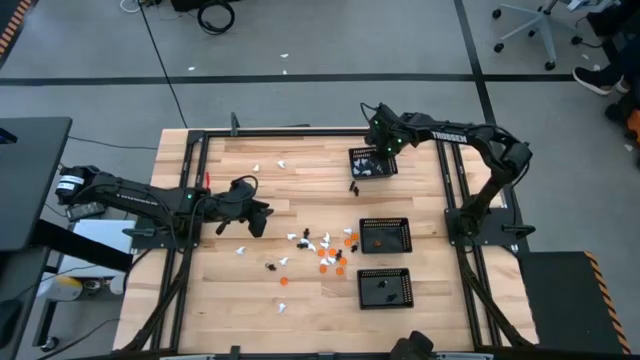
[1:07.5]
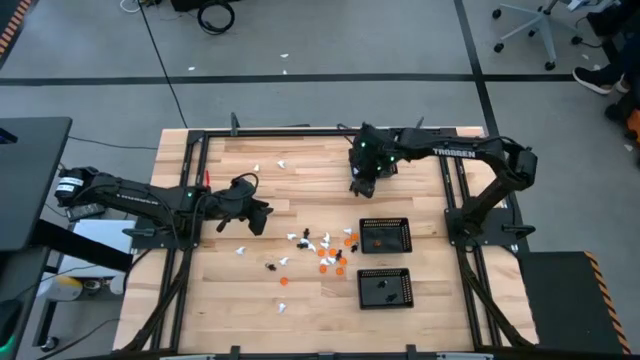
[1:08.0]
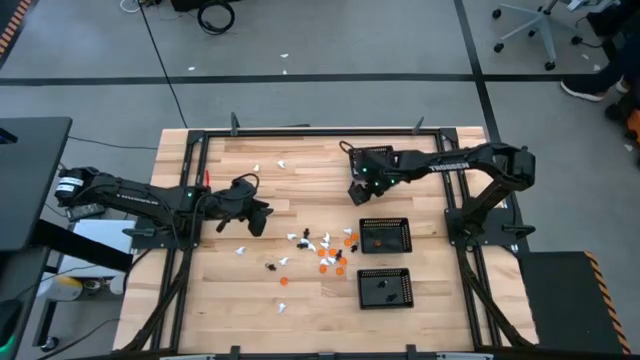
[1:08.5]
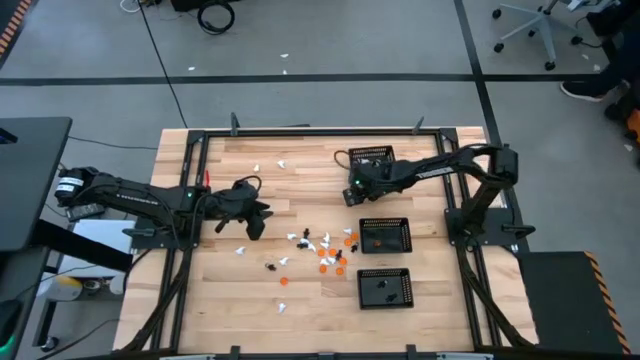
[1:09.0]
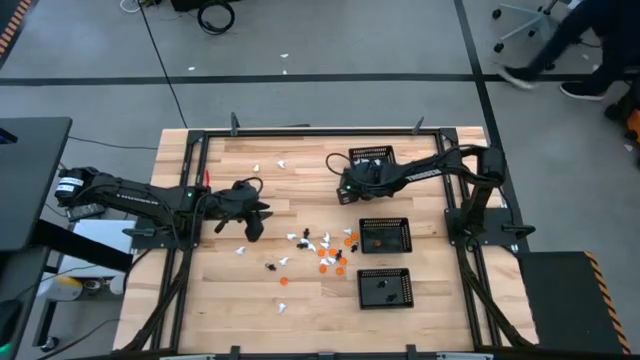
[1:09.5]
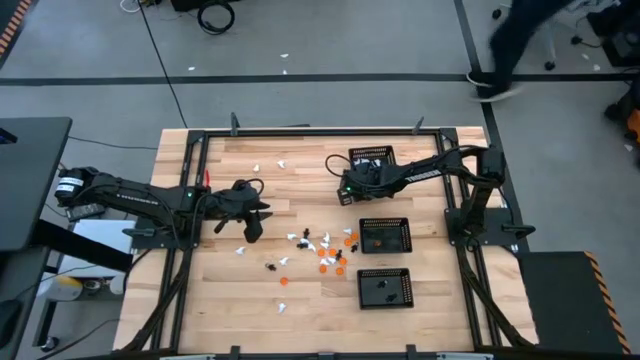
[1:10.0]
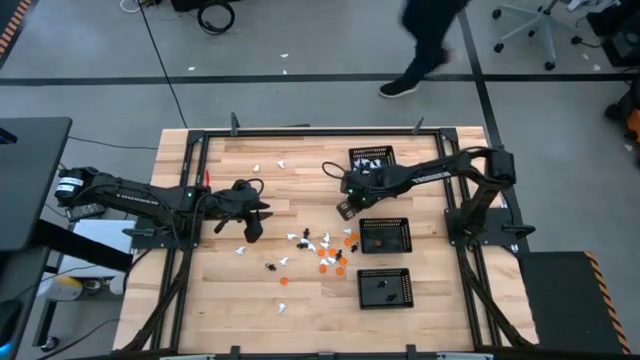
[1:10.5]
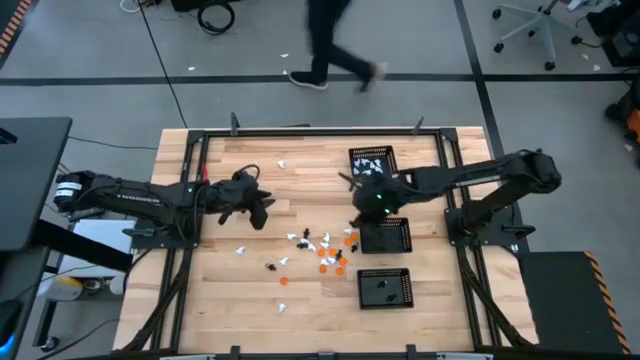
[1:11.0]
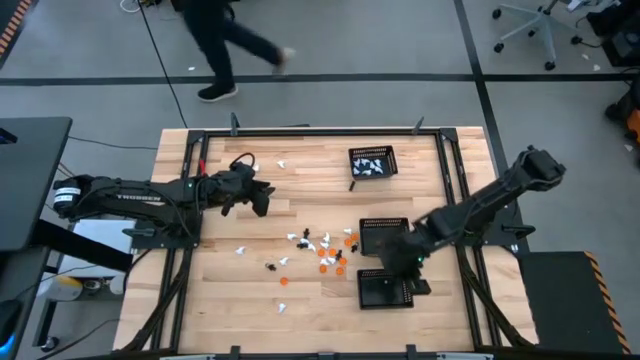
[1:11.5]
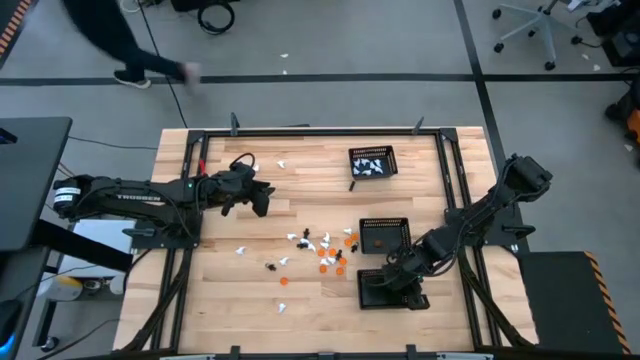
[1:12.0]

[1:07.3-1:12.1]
Task: Sort Halloween decoration
Put the black skeleton toy into the bottom black bin

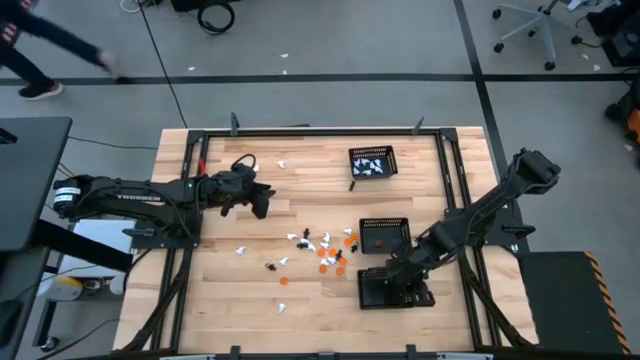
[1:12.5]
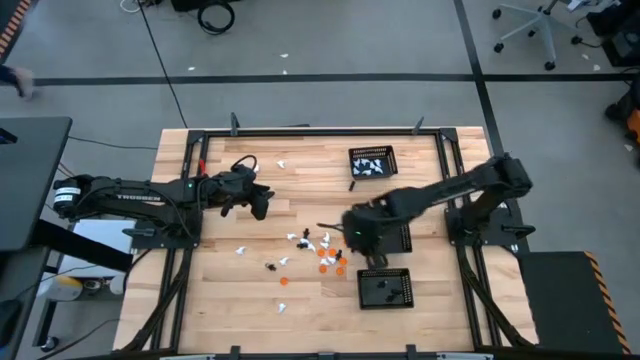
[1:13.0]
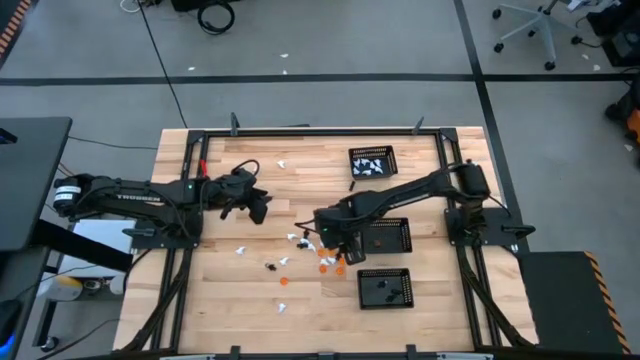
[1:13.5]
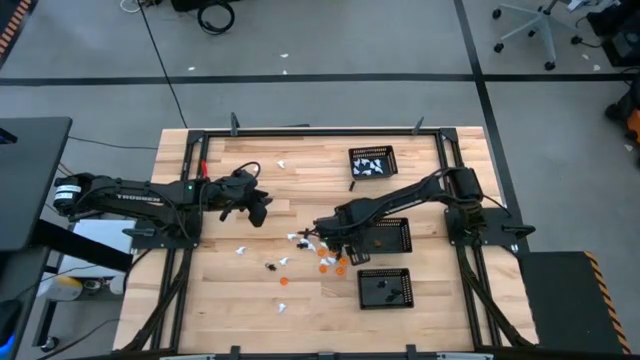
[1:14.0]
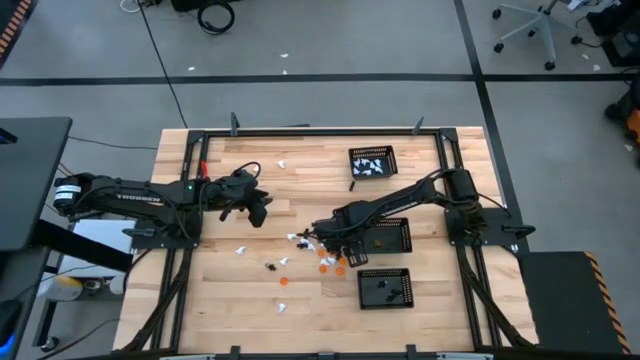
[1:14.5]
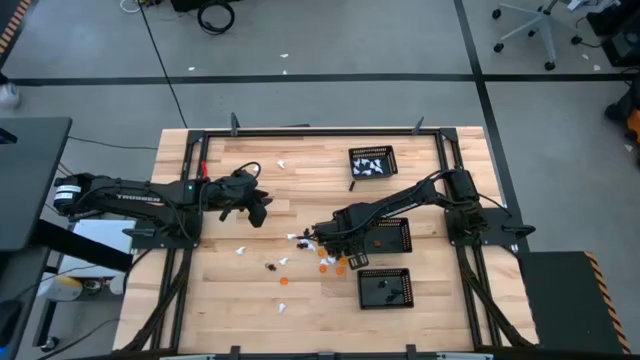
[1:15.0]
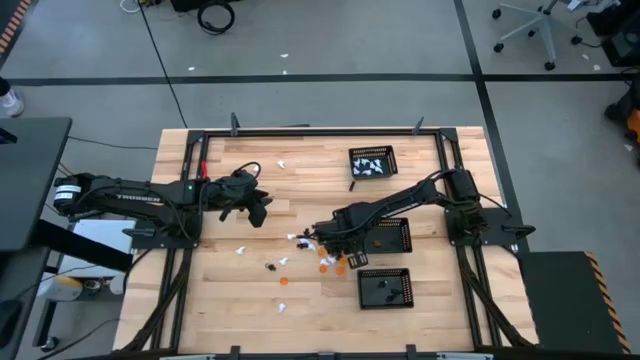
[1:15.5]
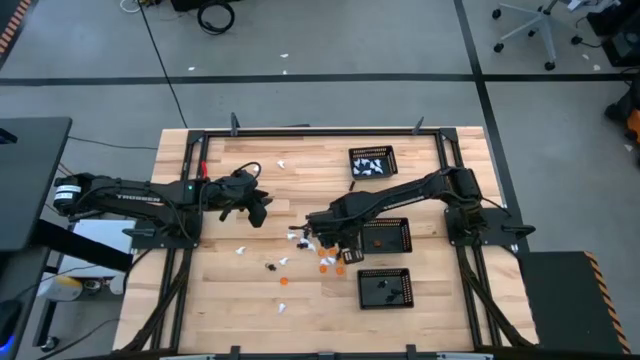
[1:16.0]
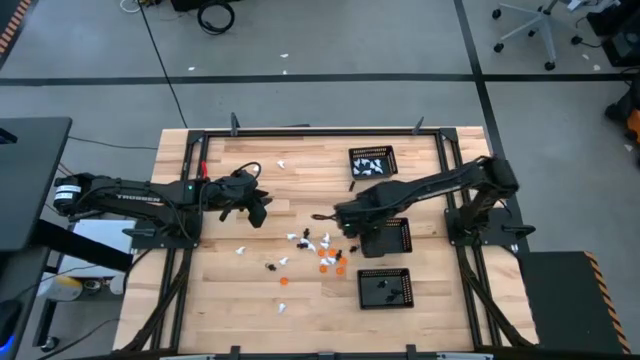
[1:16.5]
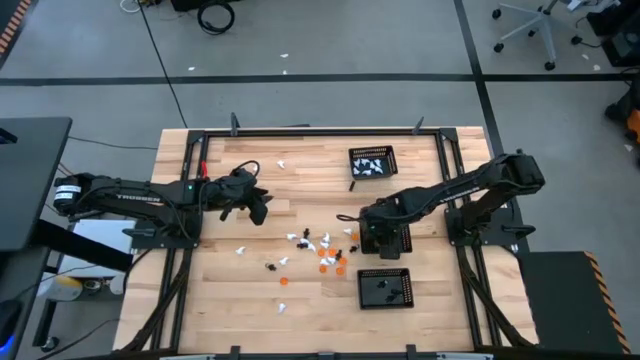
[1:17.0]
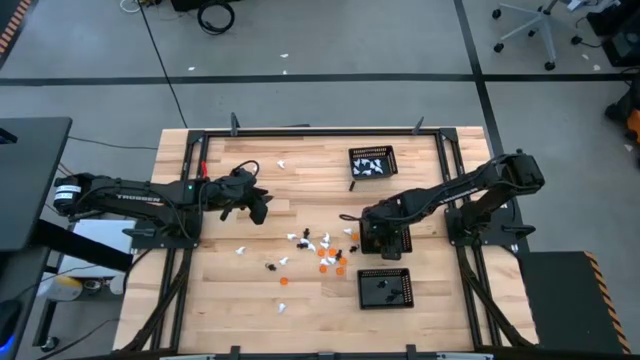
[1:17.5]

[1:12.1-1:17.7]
Put the orange pumpkin toy into the center black bin

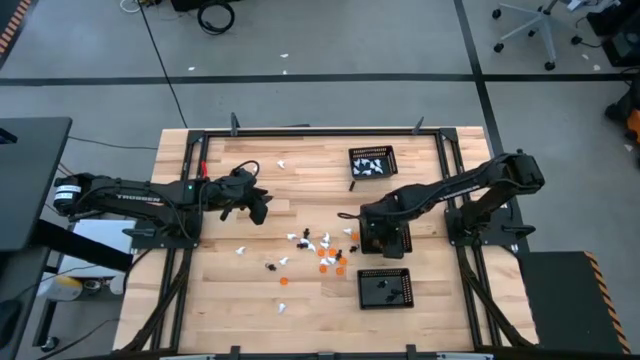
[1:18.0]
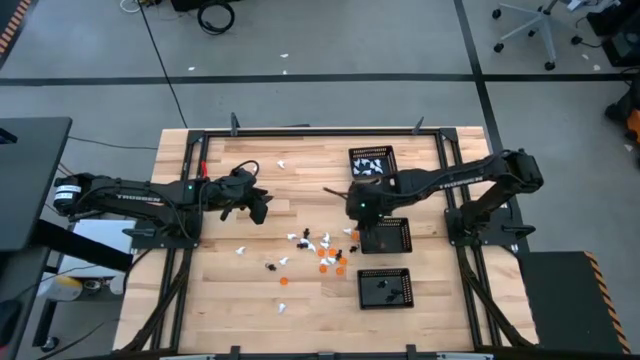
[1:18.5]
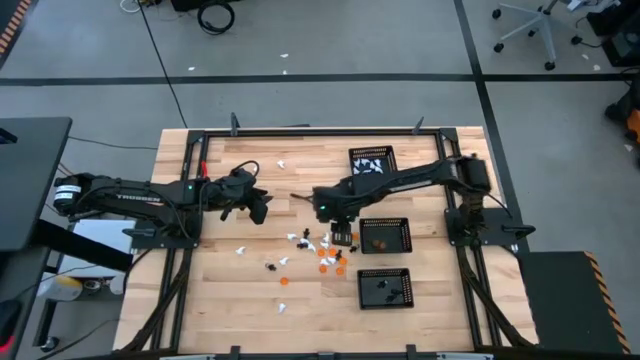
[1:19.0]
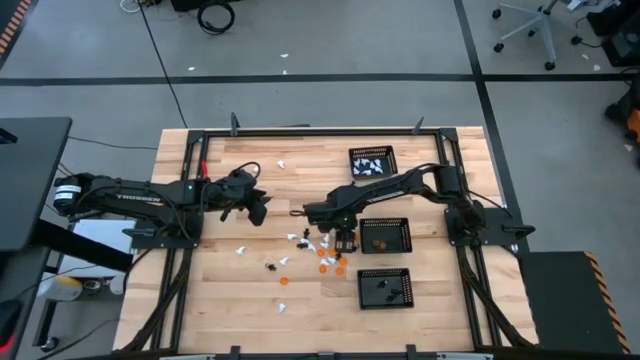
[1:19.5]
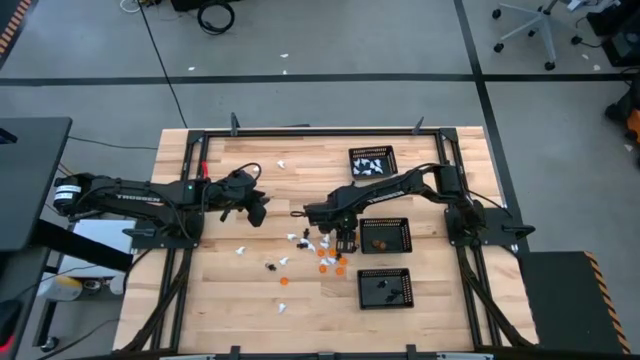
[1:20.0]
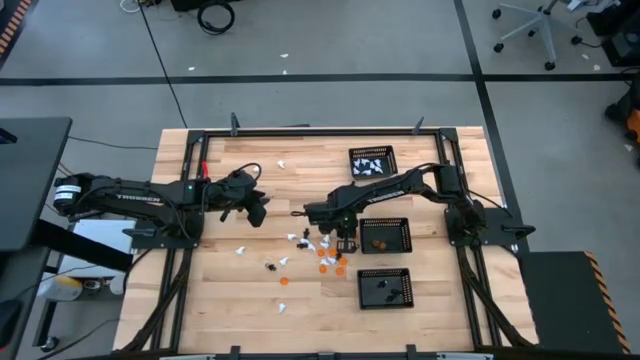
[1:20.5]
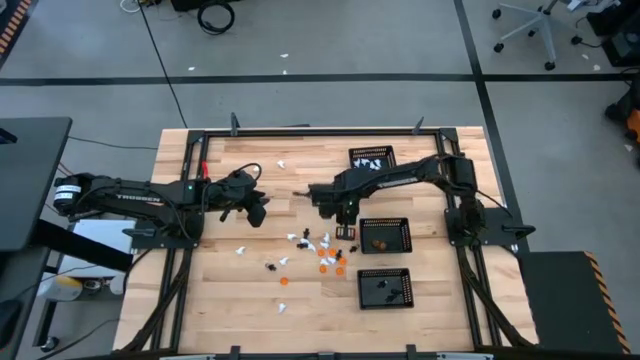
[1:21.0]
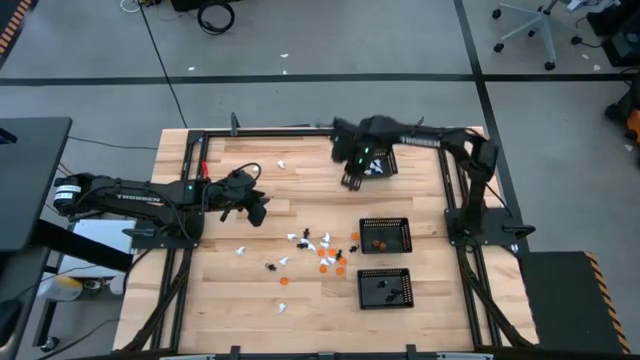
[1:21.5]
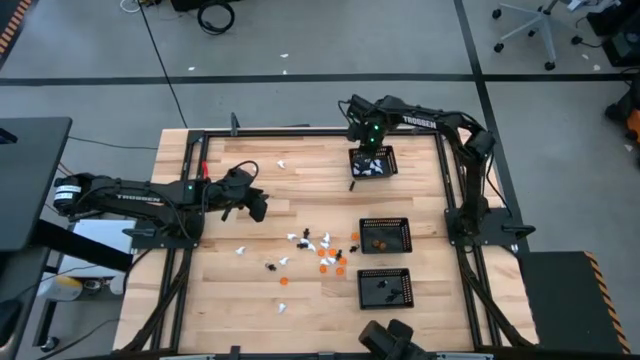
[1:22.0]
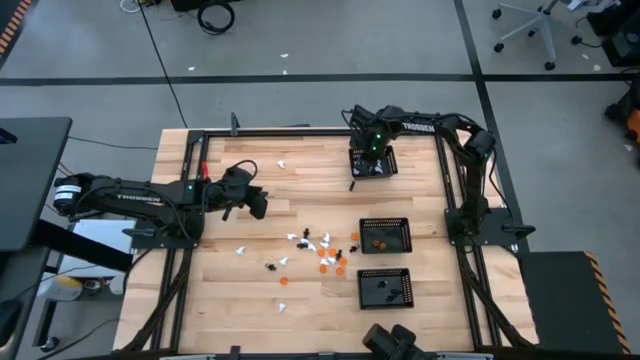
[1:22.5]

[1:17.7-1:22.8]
Put the white ghost toy into the top black bin

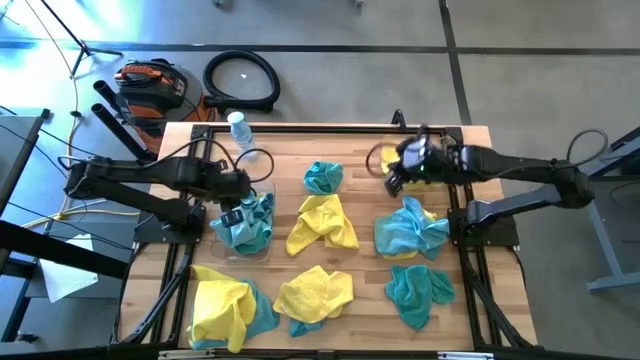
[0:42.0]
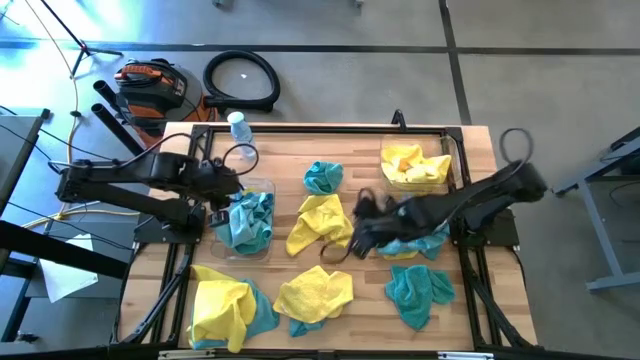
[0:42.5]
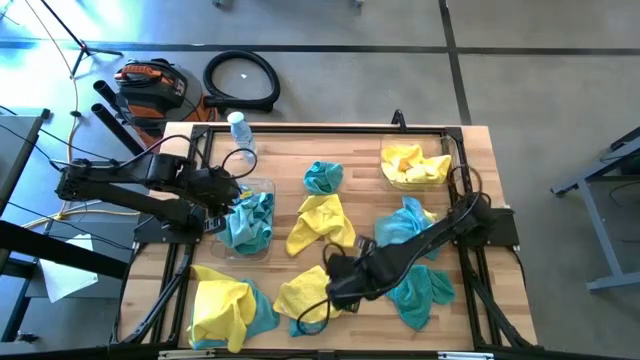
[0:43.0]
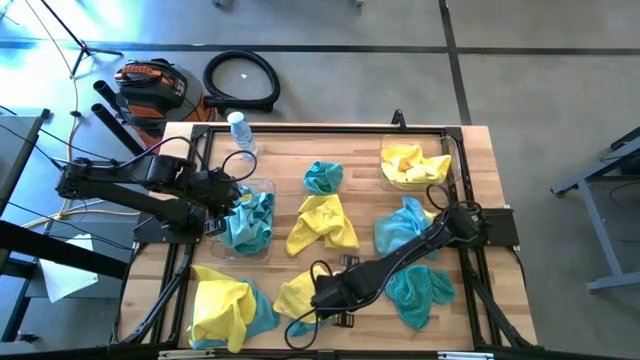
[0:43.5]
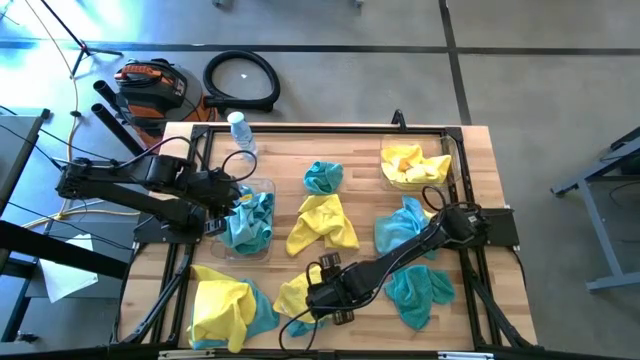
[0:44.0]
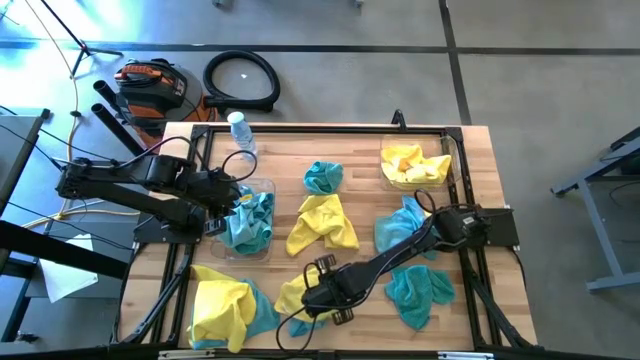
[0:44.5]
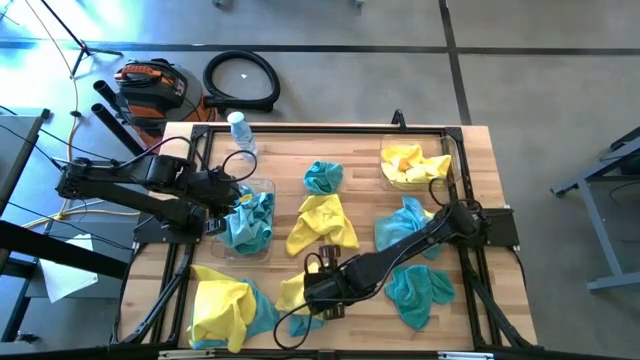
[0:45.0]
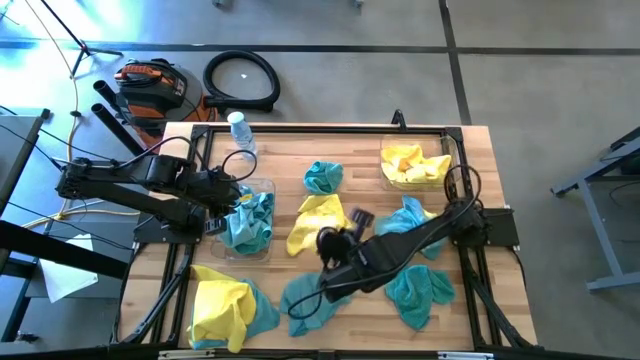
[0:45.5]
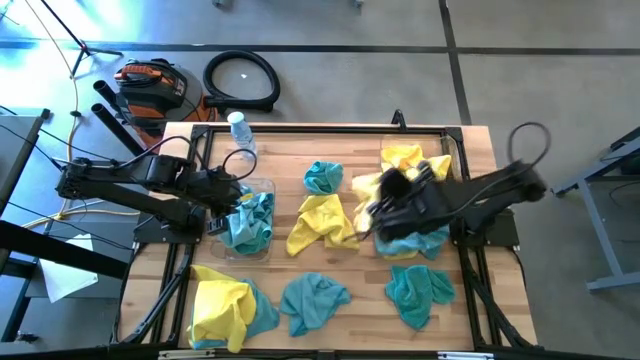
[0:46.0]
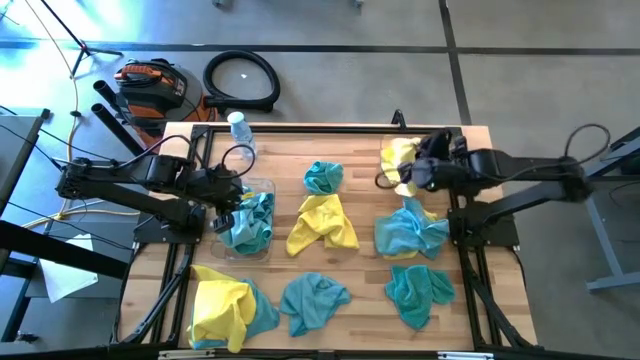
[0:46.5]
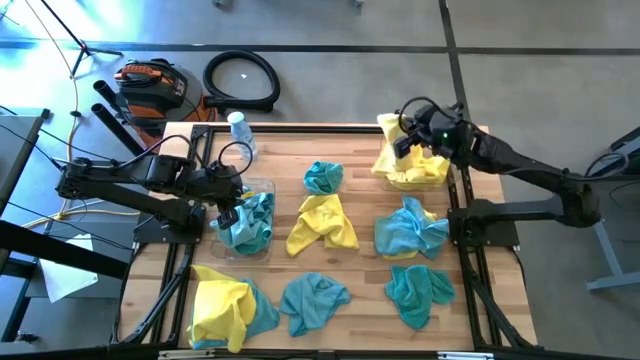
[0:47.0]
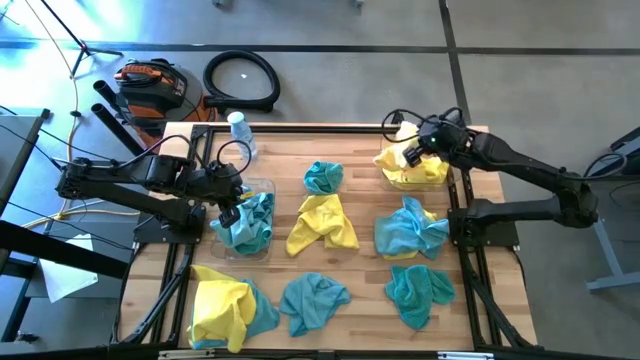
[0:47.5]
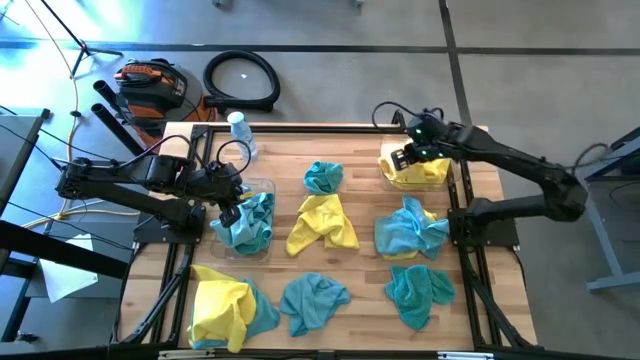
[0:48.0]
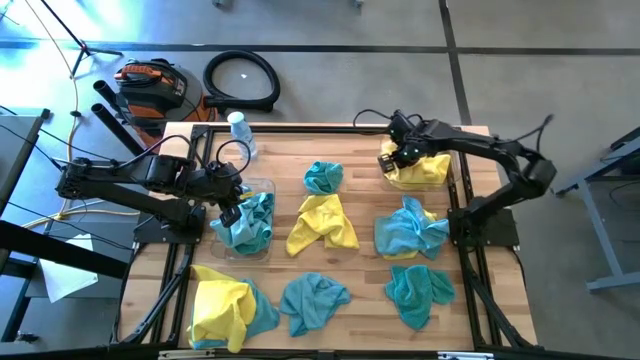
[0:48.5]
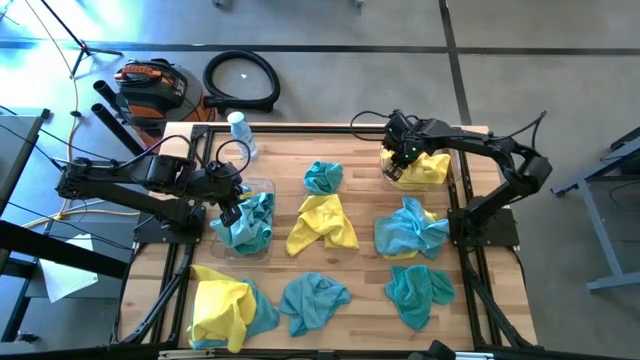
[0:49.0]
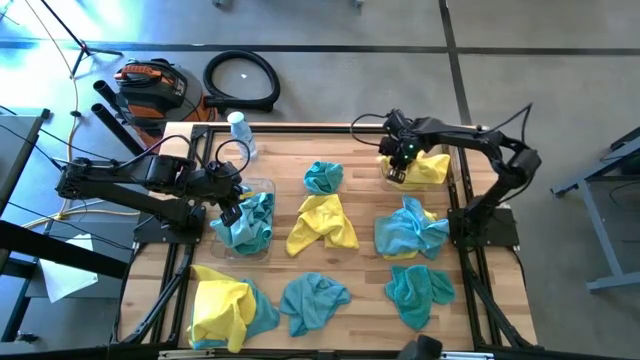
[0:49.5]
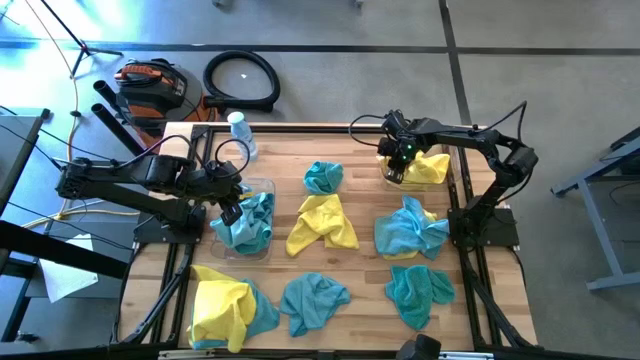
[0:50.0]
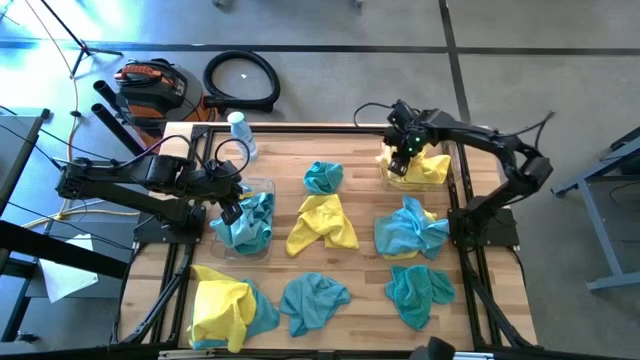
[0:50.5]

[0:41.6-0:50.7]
Task: Sort microfiber towel by color & place in baskets
Put the yellow microfiber cloth into the right transparent bin
